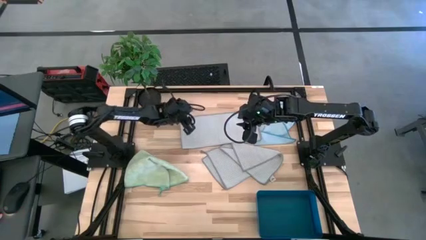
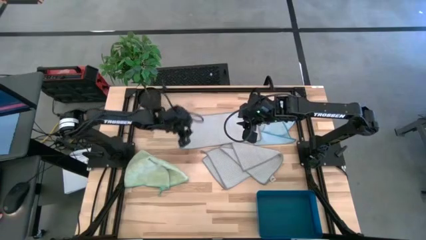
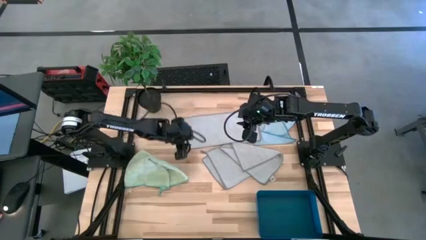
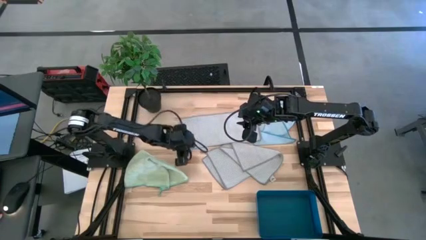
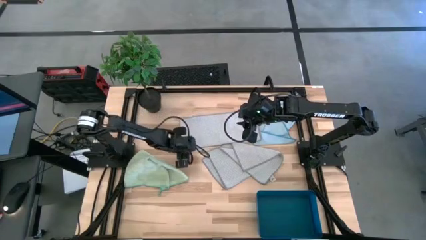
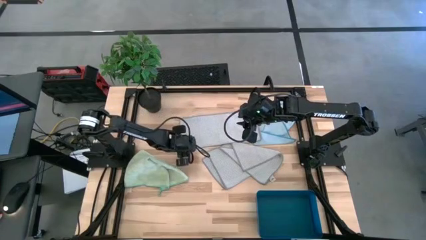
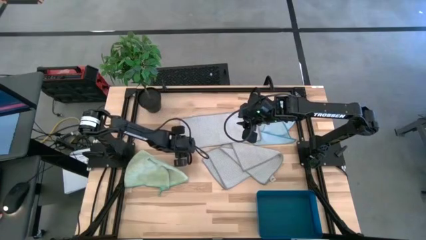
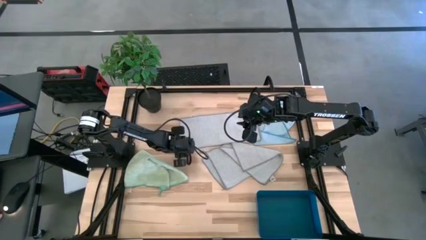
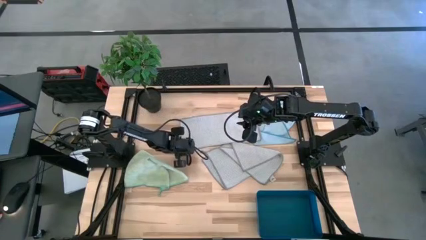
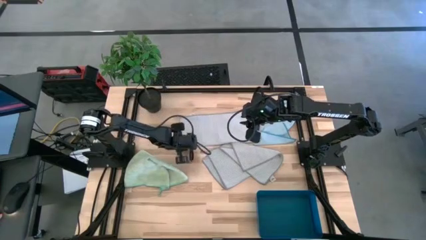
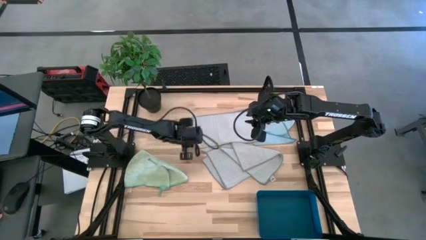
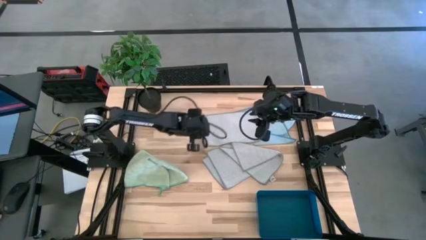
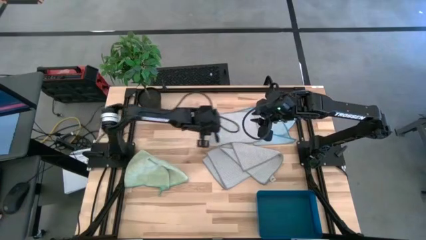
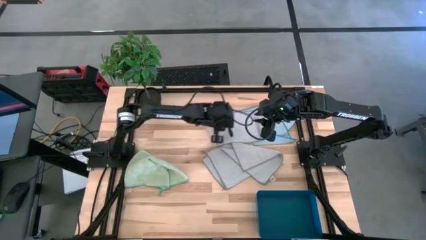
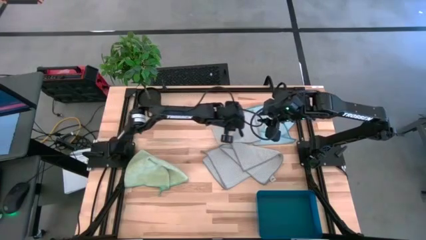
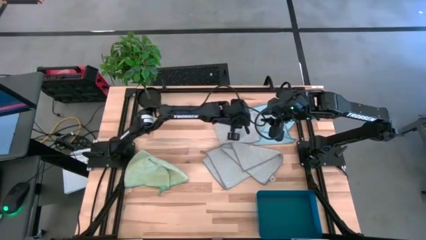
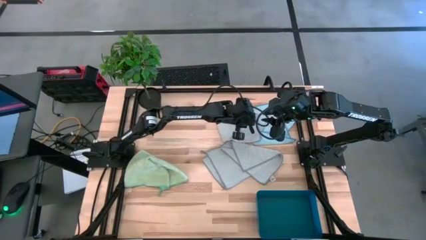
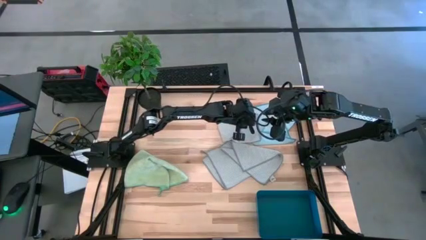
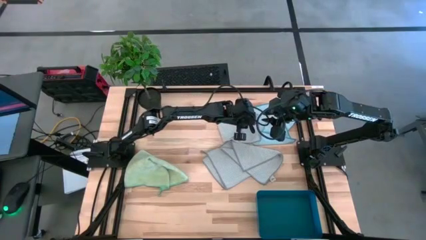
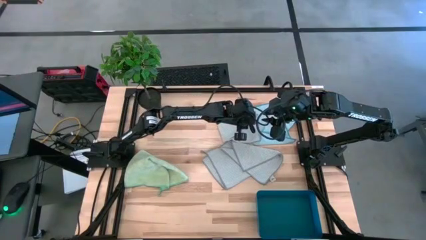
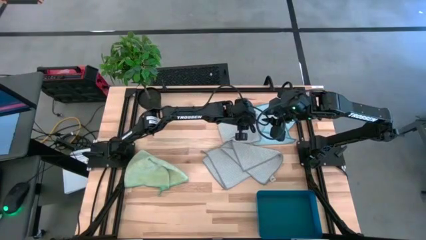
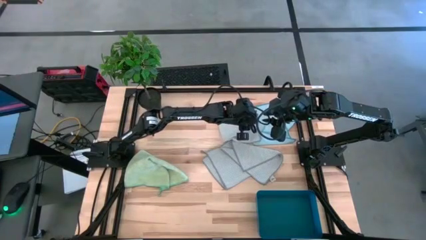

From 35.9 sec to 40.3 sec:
Task: Fold microfiber towels
Fold the gray microfiber cloth

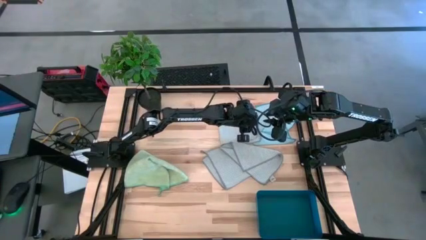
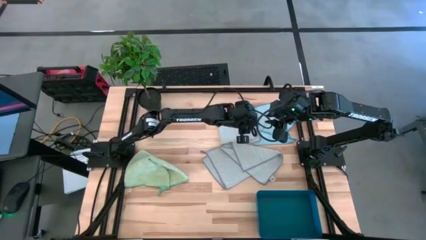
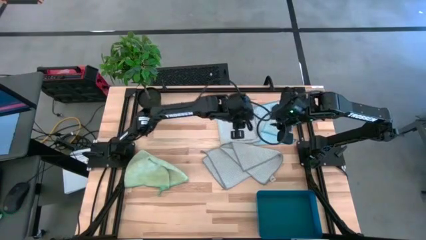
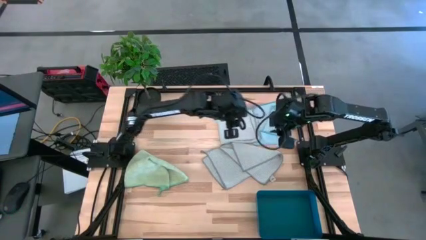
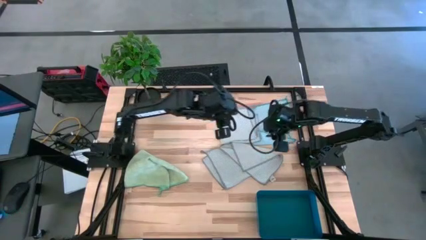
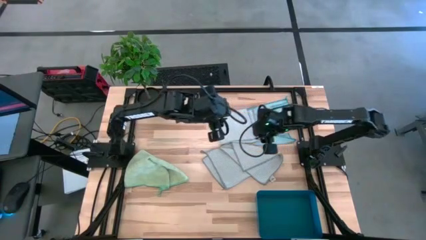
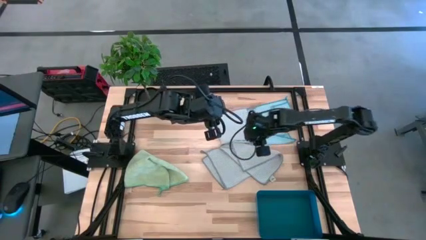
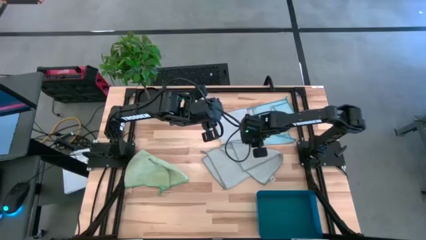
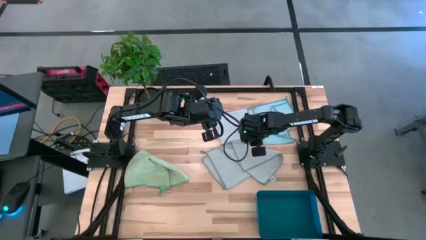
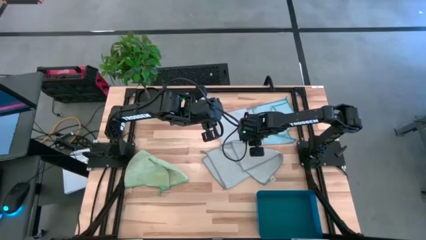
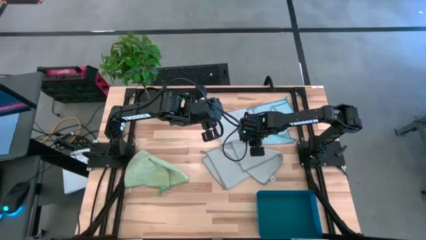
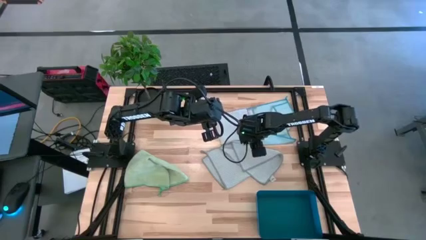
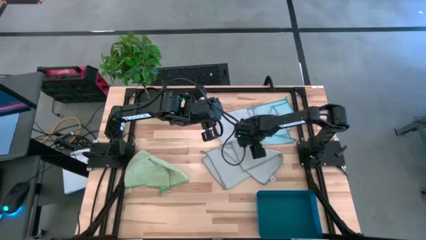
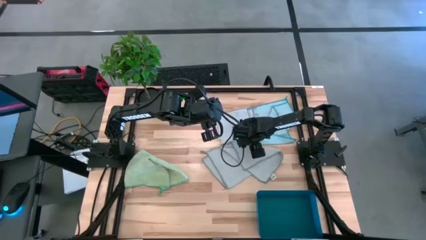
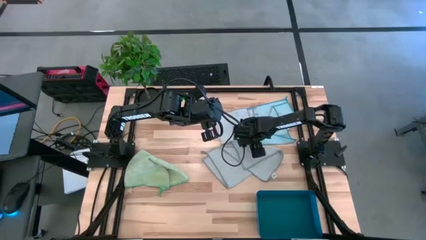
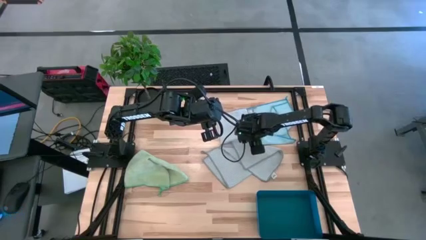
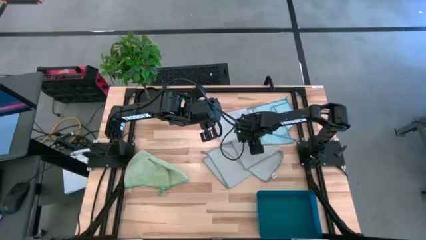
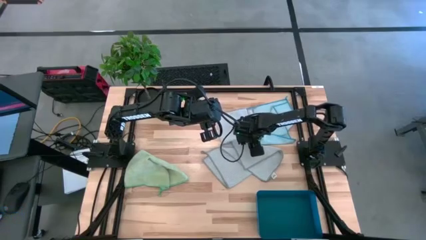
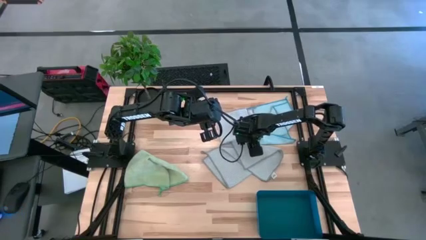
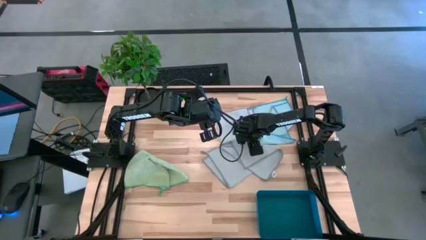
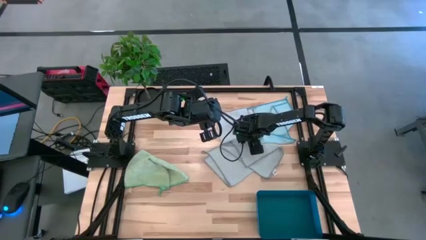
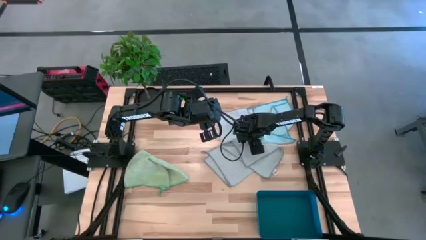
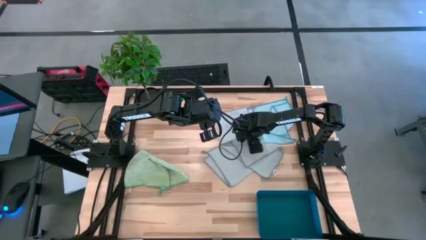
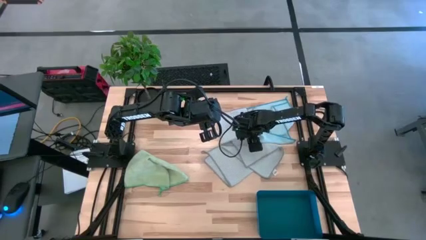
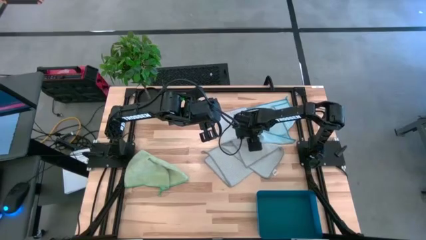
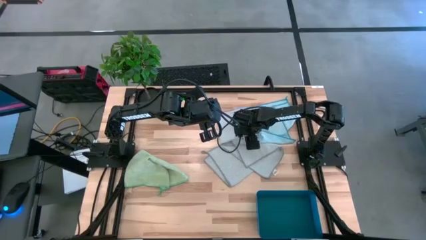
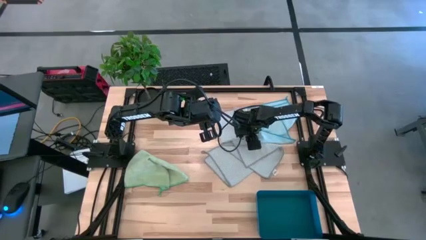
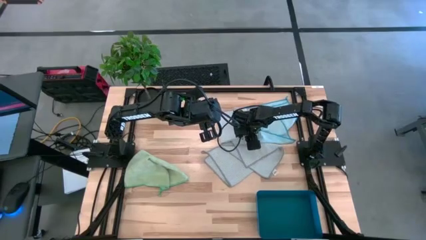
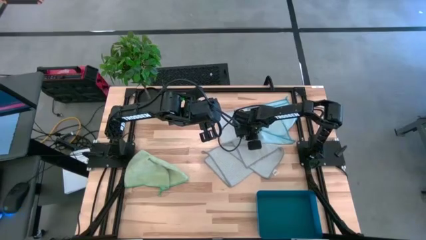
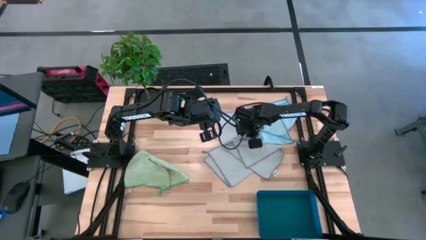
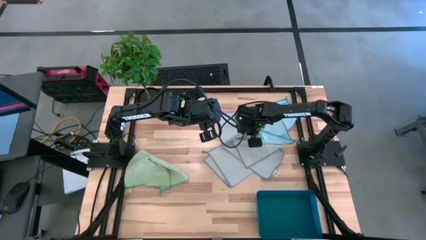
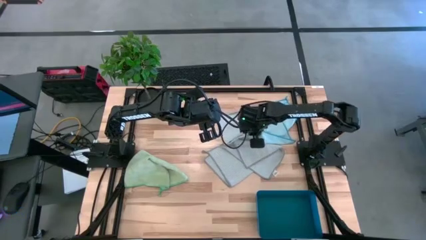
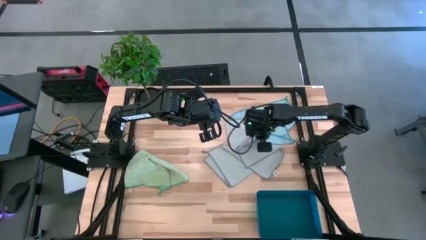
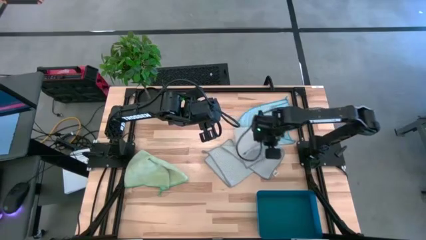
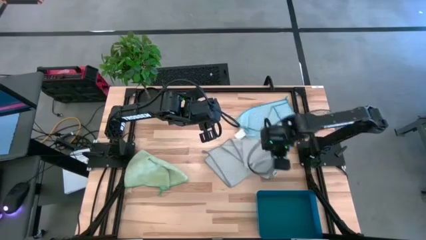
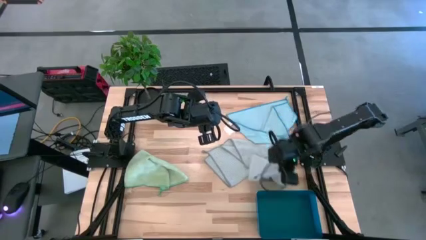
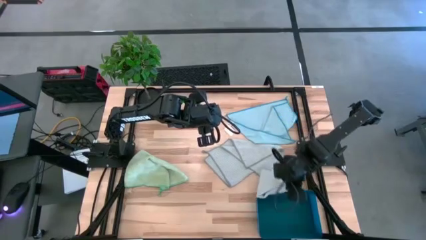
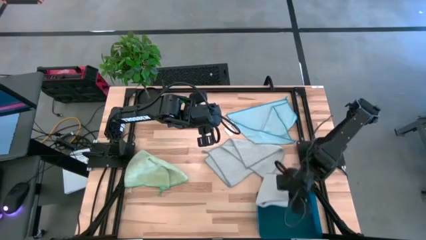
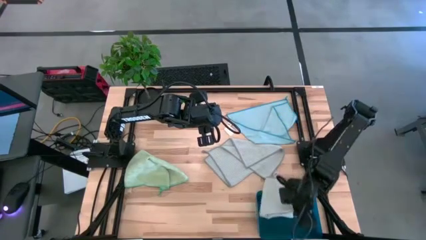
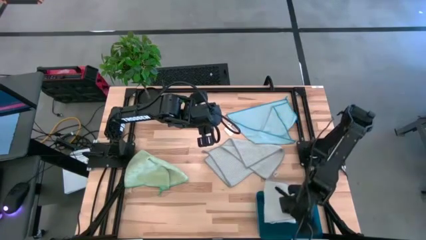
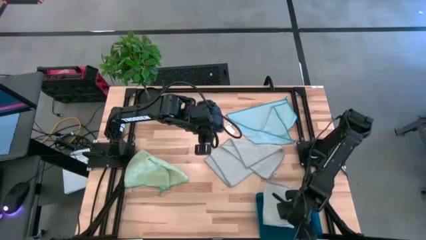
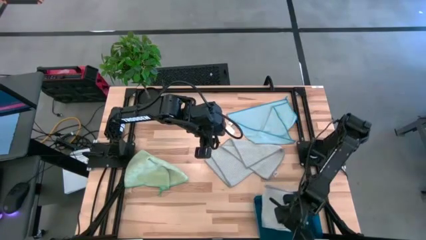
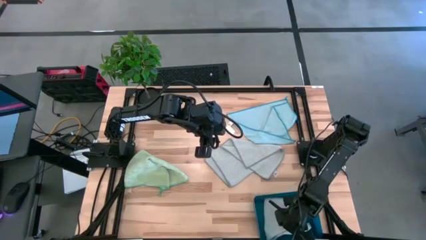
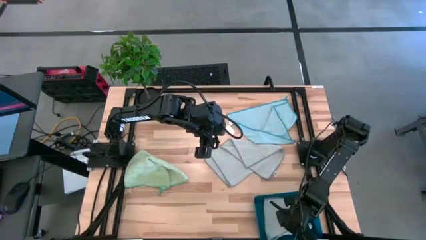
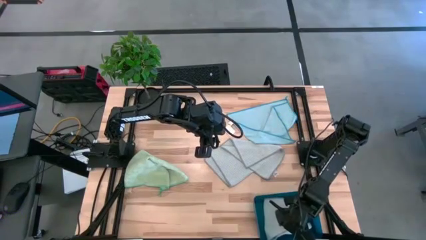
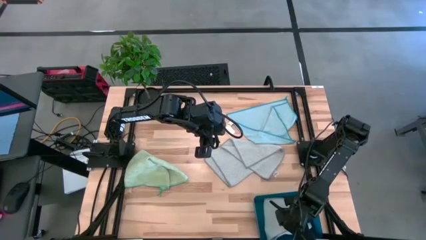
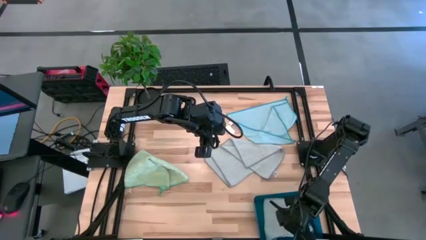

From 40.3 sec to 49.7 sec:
Put the gray microfiber cloth into the bin

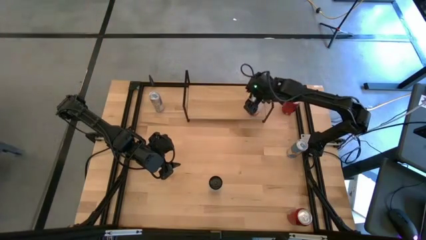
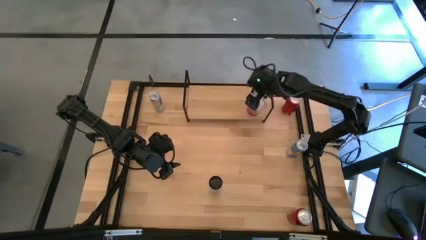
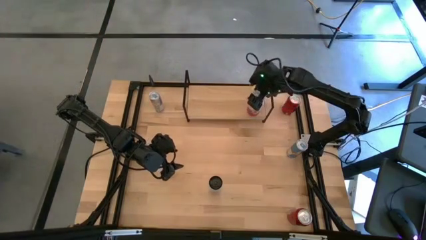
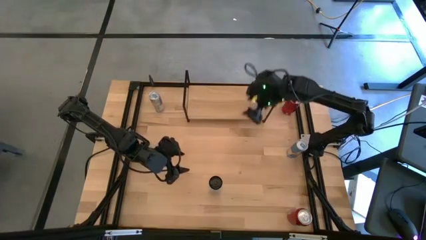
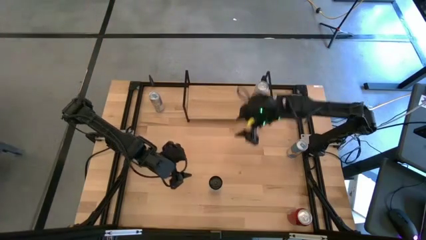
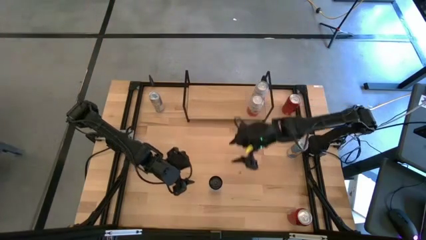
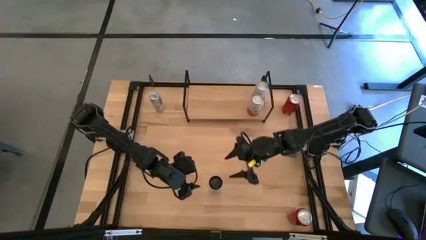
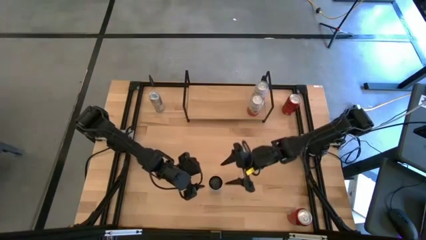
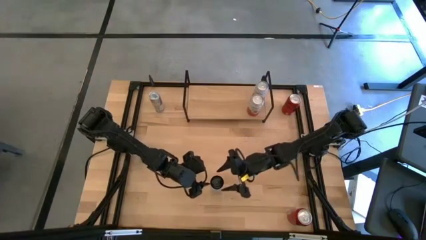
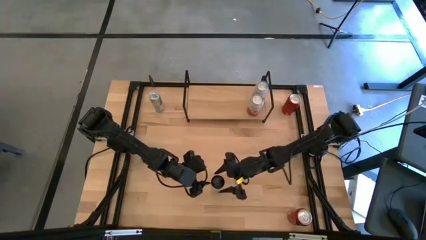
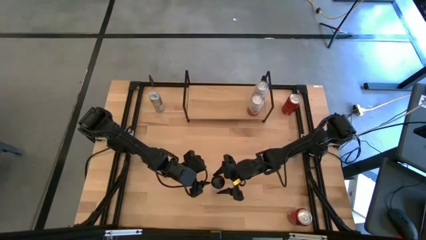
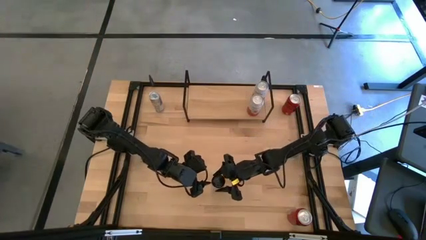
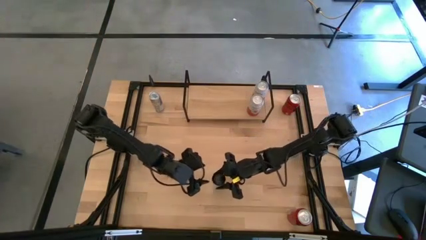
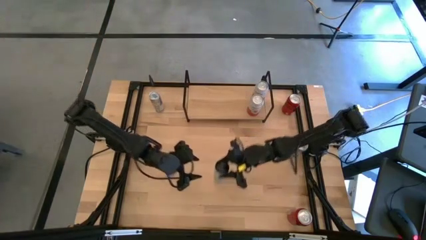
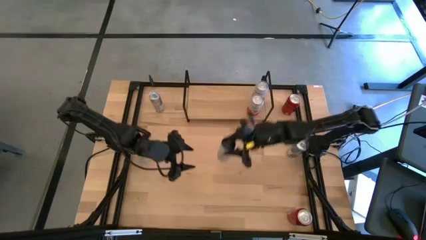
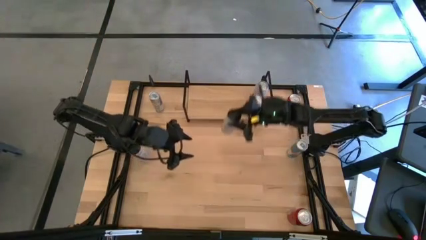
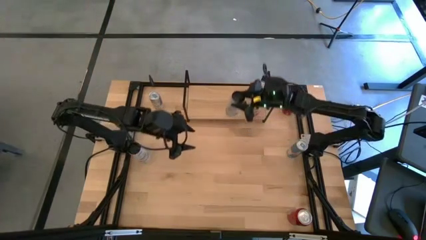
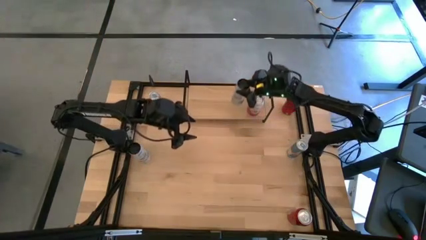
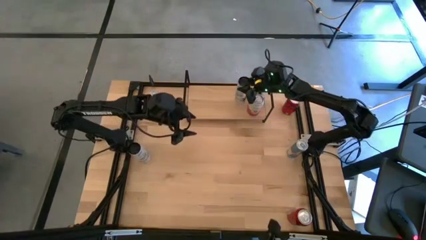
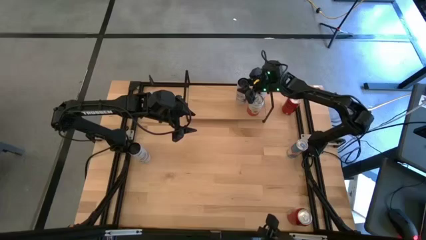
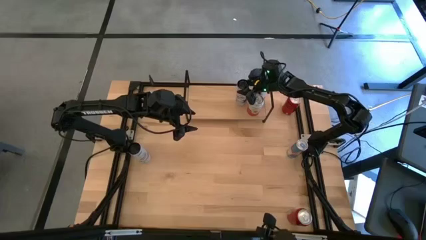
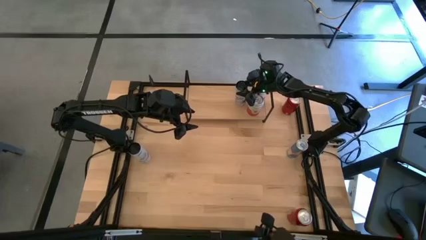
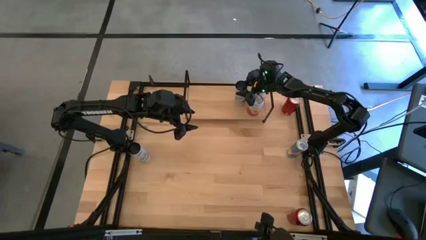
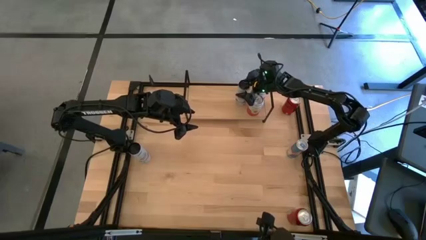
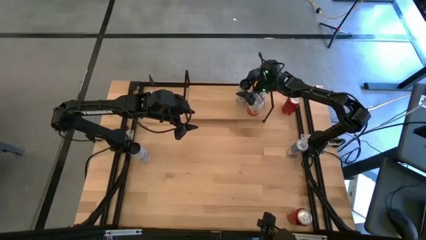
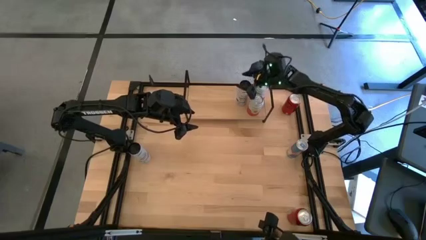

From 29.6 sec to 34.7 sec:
Task: Place canned beverage on shelf
Put the right white and blue soda can on the shelf
